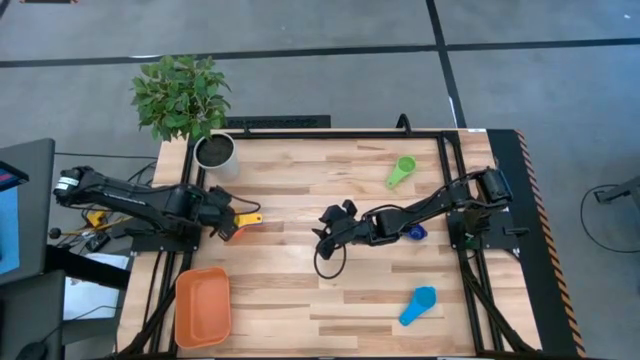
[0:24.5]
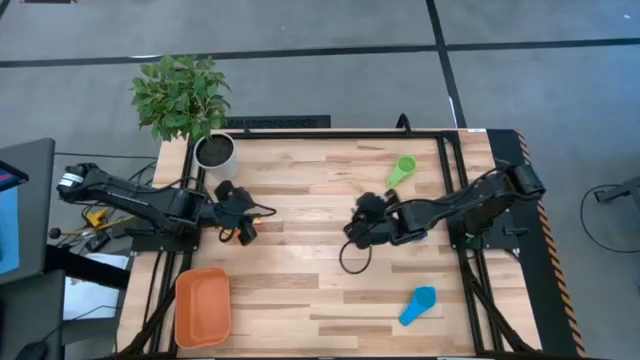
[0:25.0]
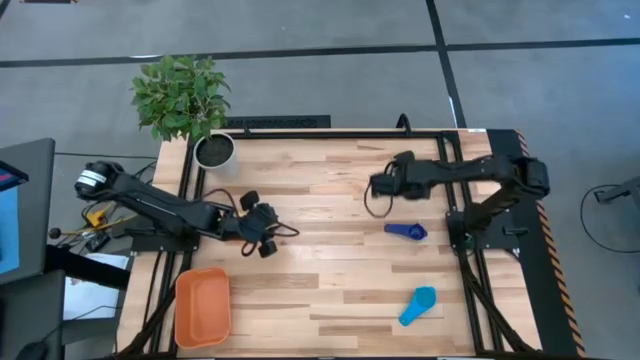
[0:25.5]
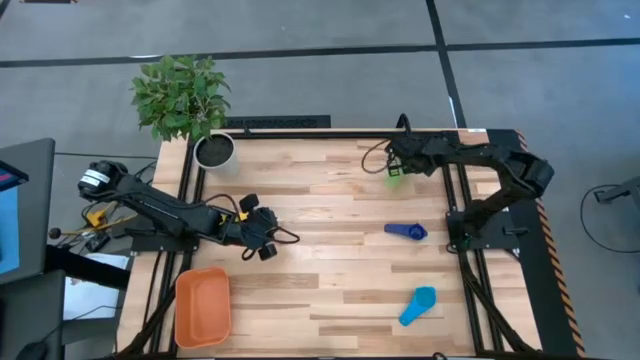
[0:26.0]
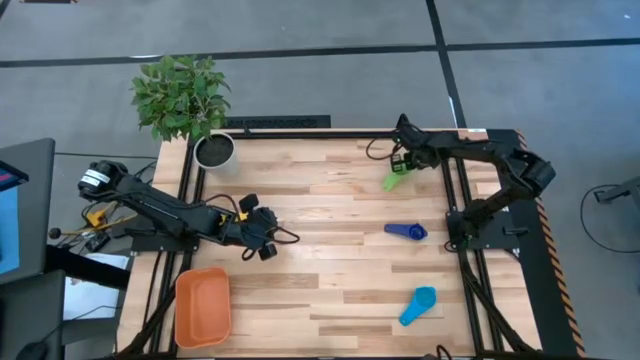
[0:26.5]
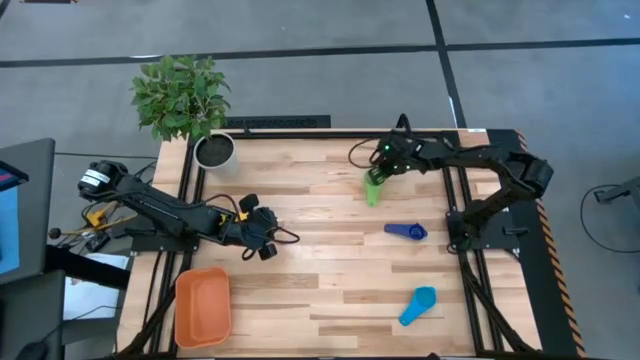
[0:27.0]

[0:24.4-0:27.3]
Task: Nest measuring cups in basket
Stack the green measuring cup on top of the yellow measuring cup

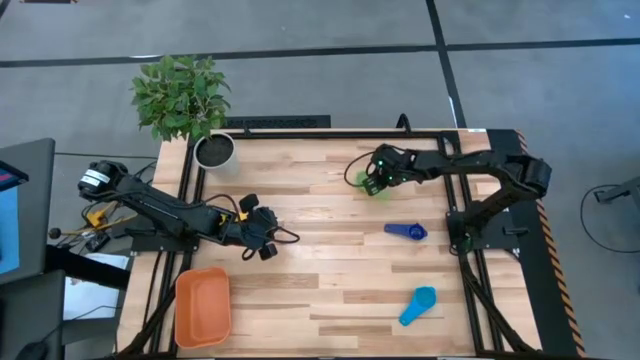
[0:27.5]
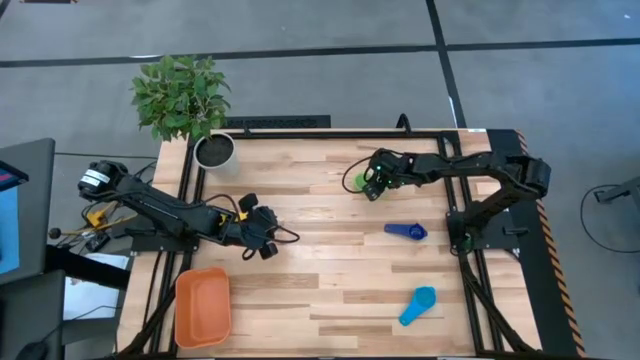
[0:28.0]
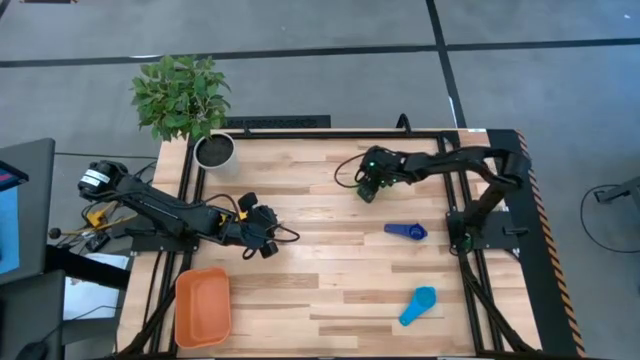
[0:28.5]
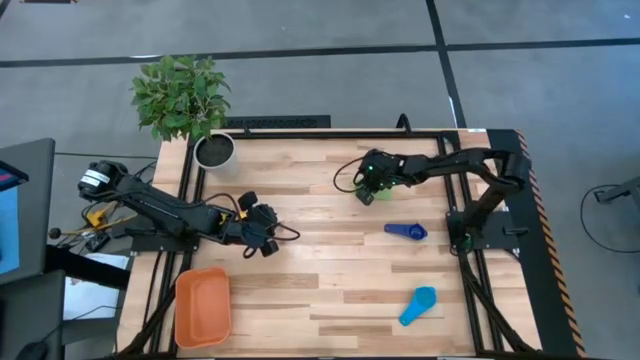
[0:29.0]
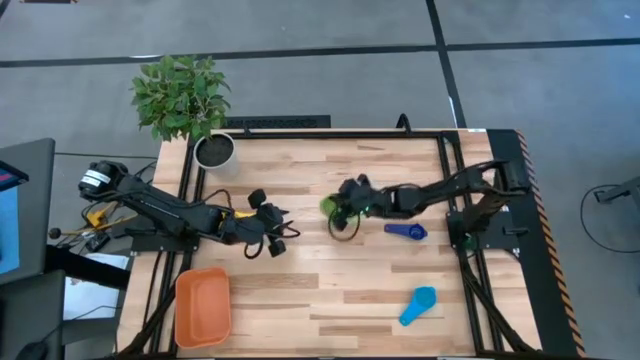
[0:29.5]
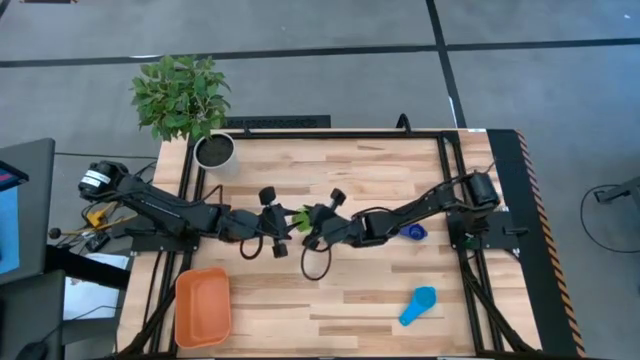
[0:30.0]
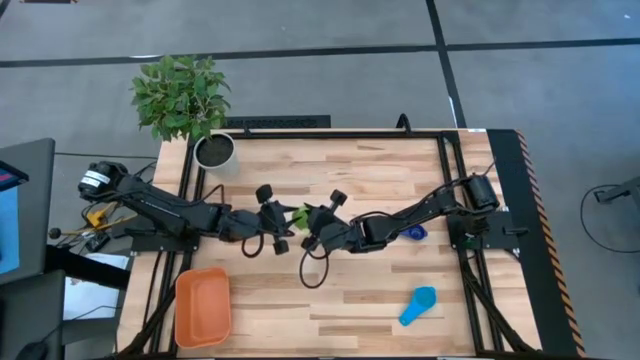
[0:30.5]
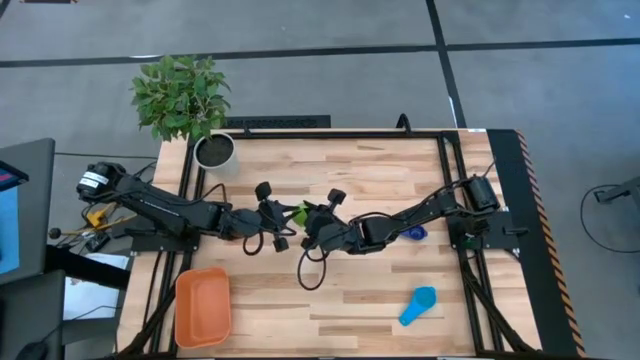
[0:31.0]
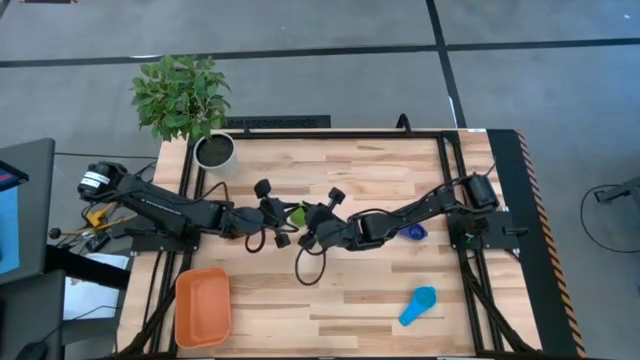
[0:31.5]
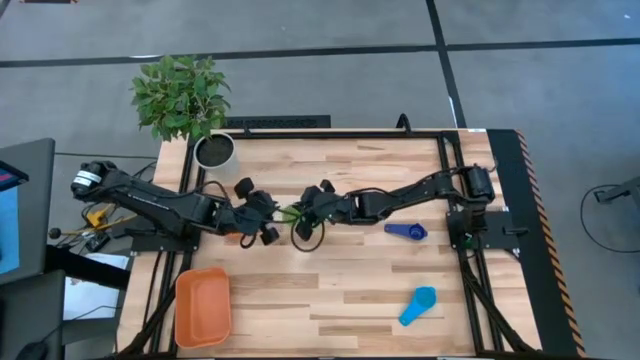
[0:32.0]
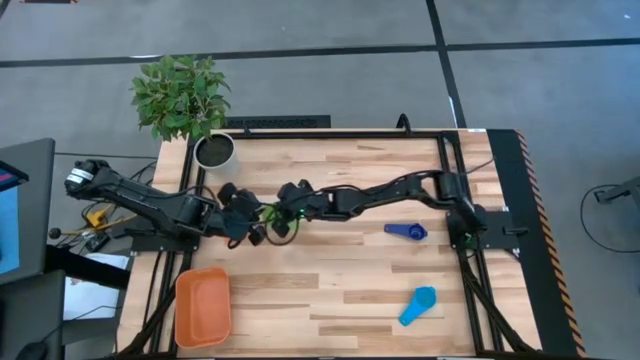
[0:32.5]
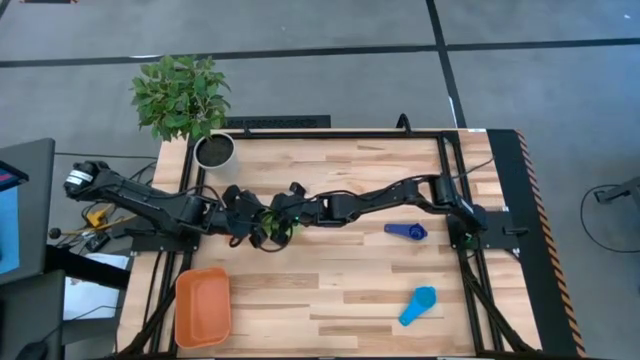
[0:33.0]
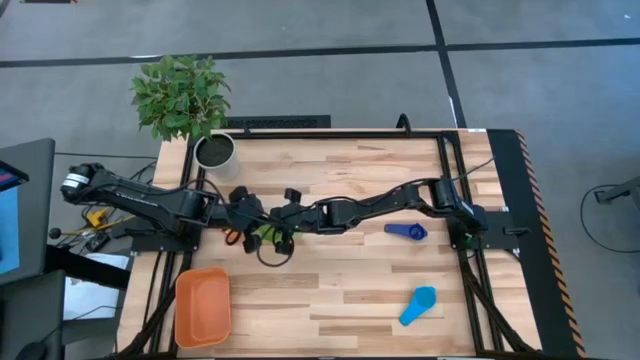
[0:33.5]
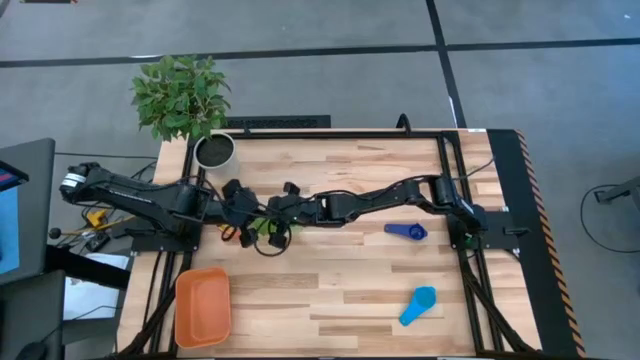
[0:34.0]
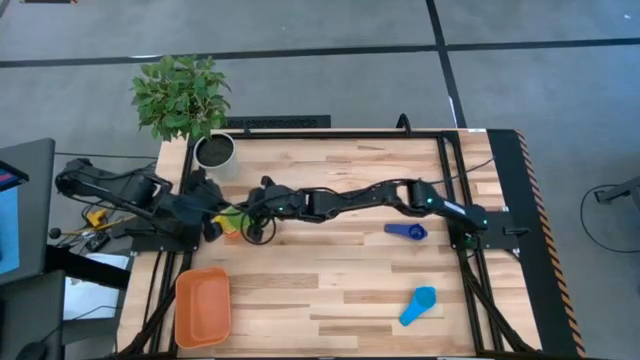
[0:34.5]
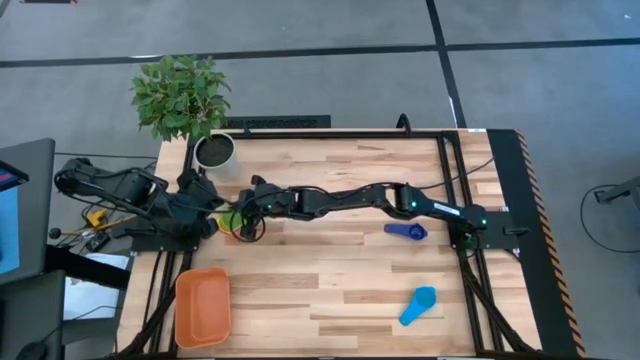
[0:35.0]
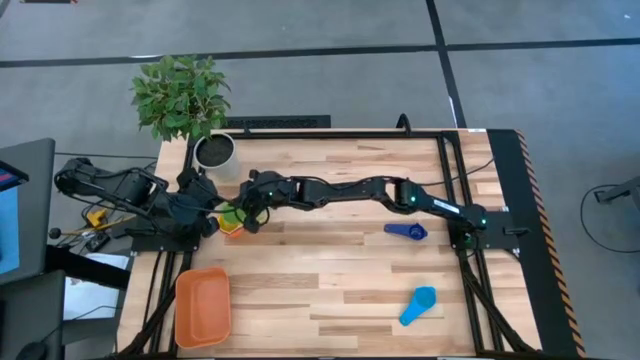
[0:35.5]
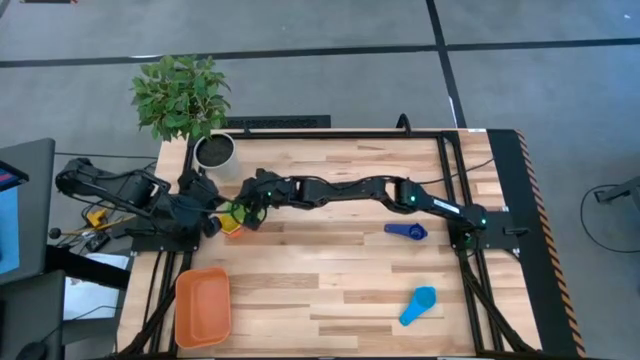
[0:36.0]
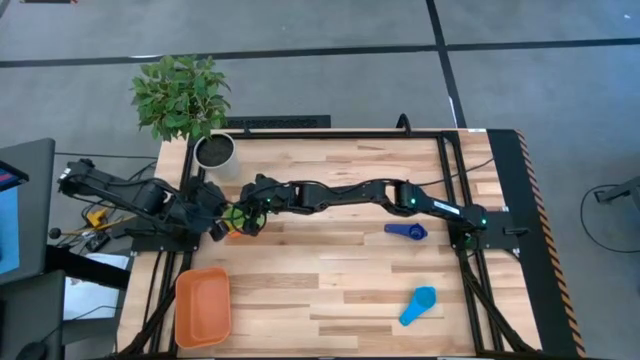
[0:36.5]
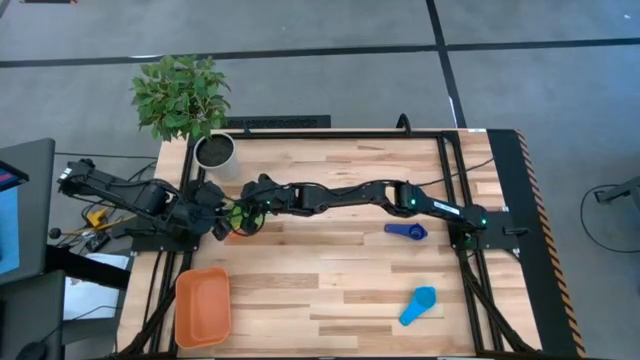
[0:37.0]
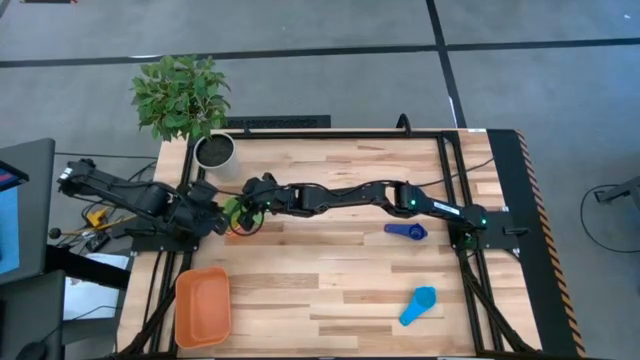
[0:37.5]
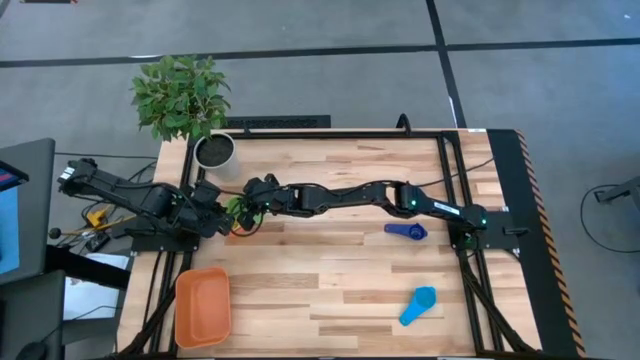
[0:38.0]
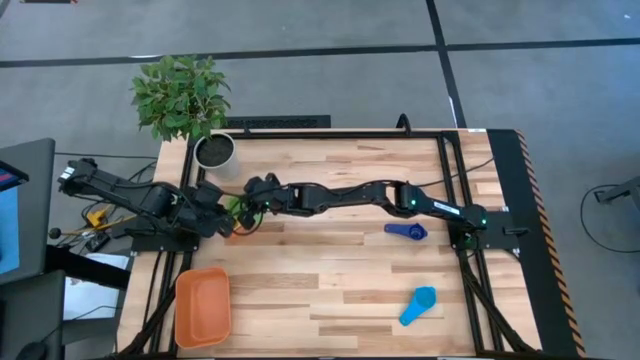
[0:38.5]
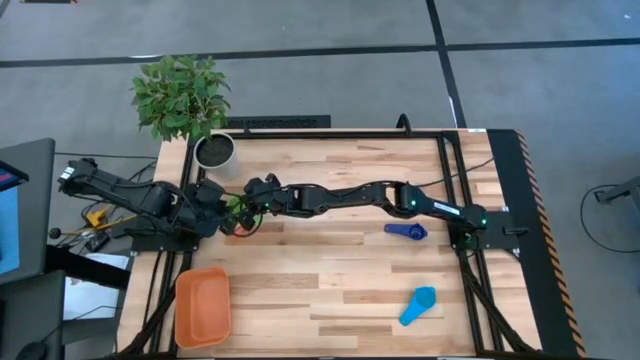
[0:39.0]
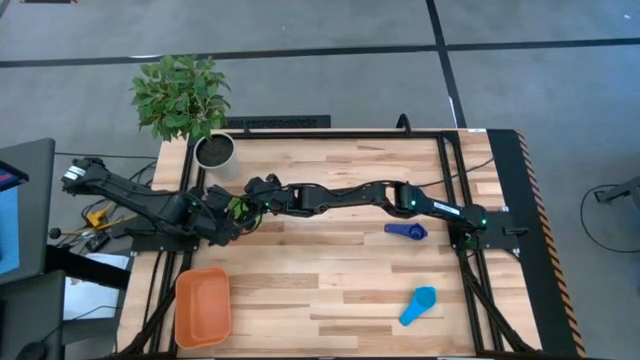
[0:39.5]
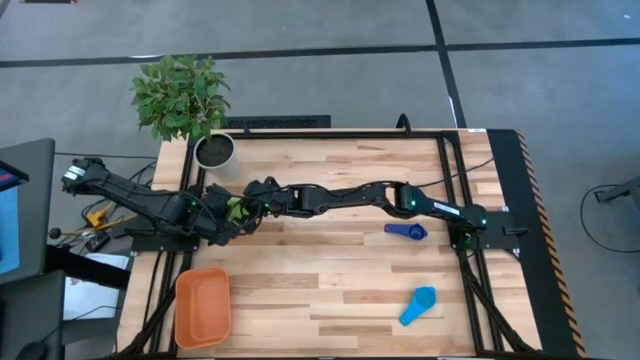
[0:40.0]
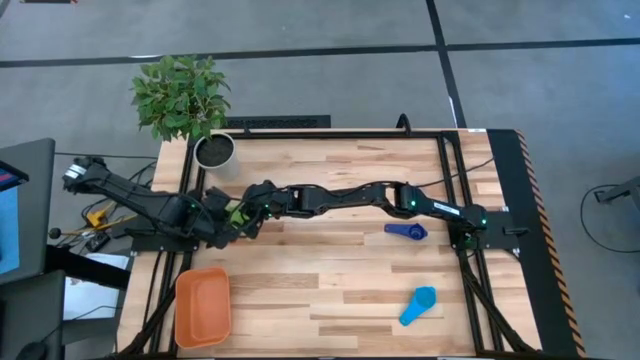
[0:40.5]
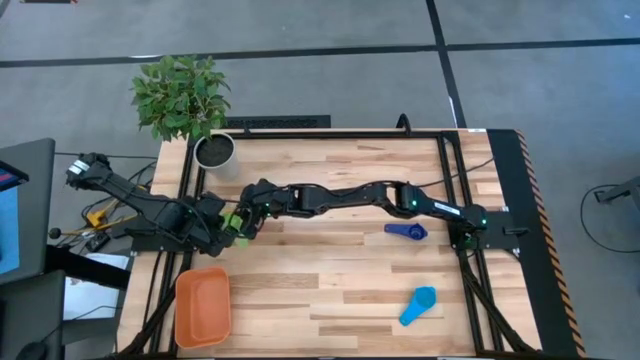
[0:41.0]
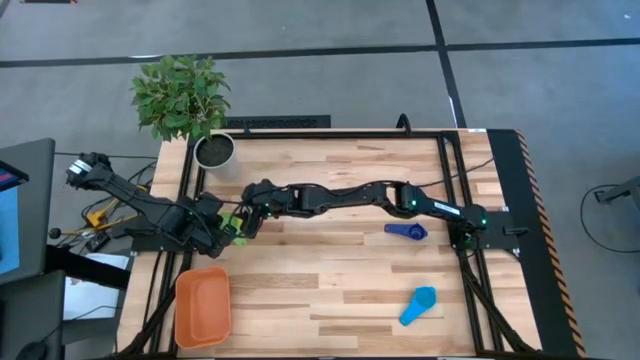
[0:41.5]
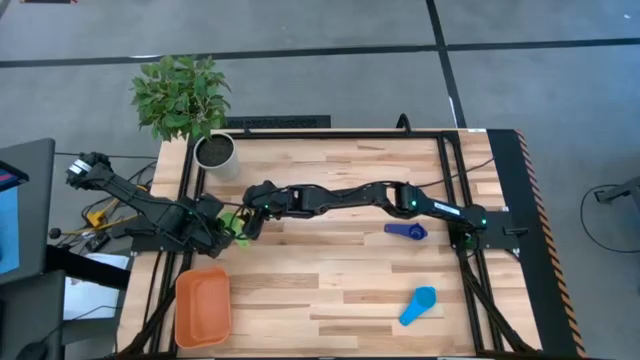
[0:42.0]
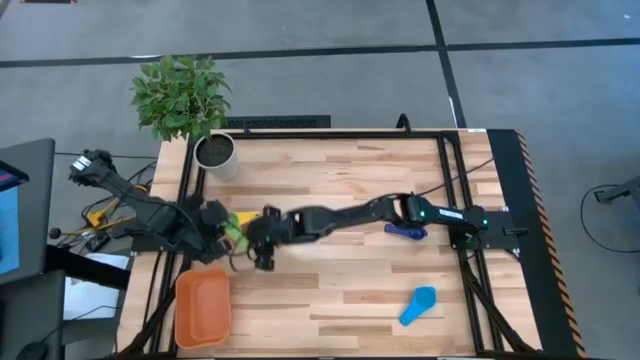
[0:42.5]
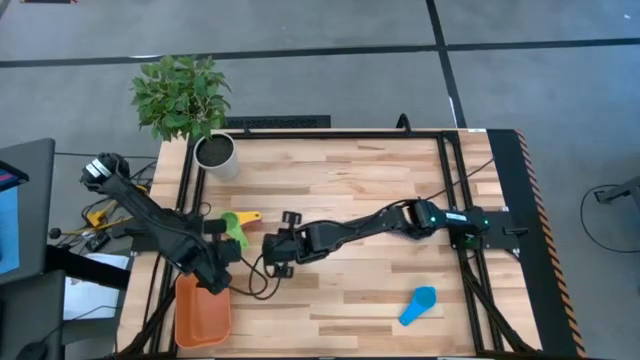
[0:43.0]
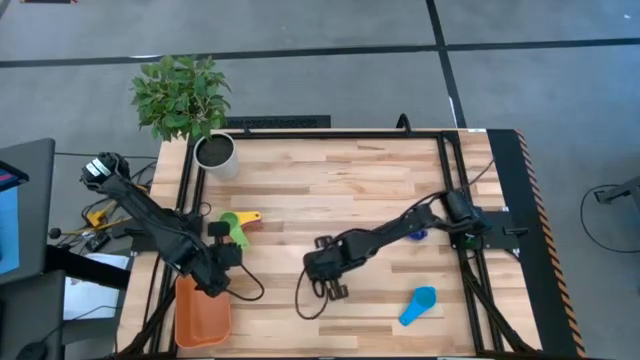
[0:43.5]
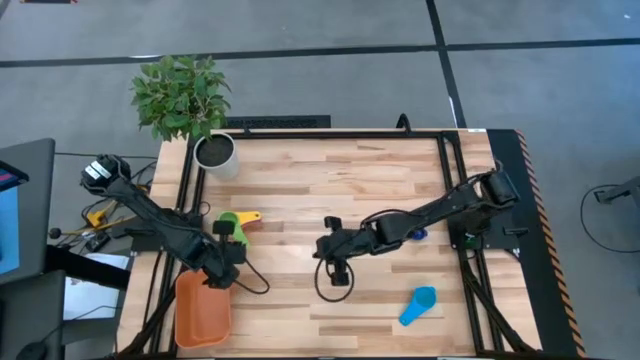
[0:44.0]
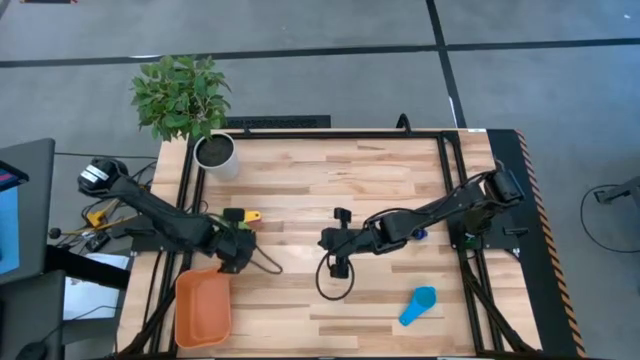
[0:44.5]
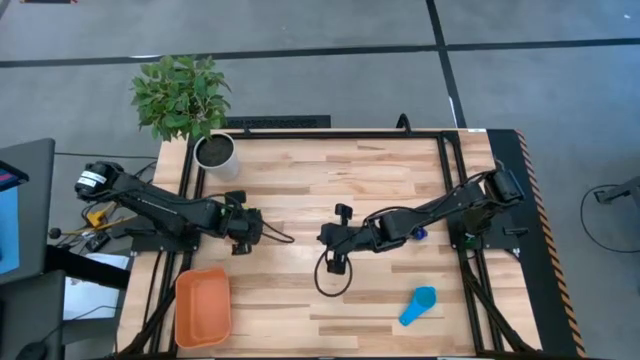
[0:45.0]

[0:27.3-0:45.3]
Stack the green measuring cup on top of the yellow measuring cup

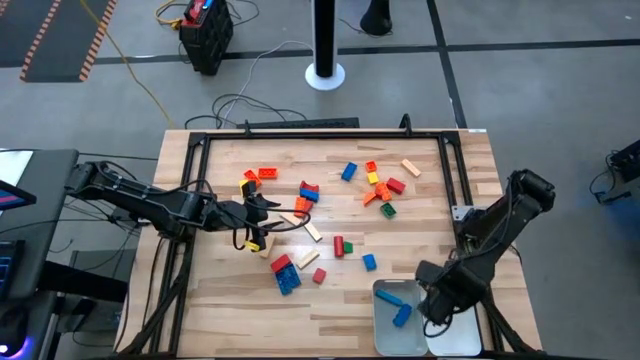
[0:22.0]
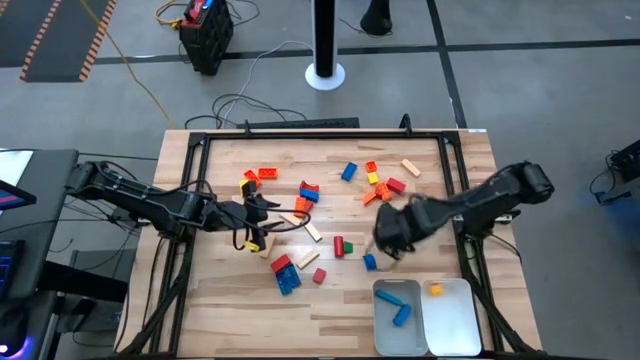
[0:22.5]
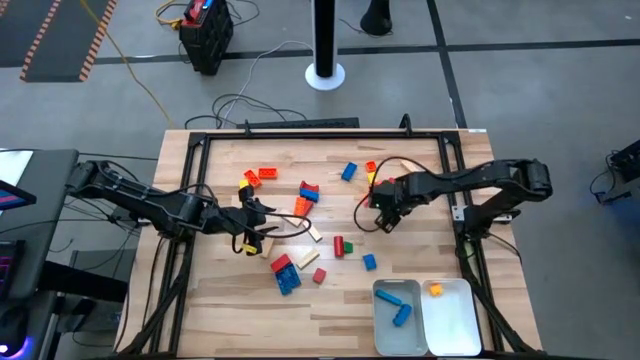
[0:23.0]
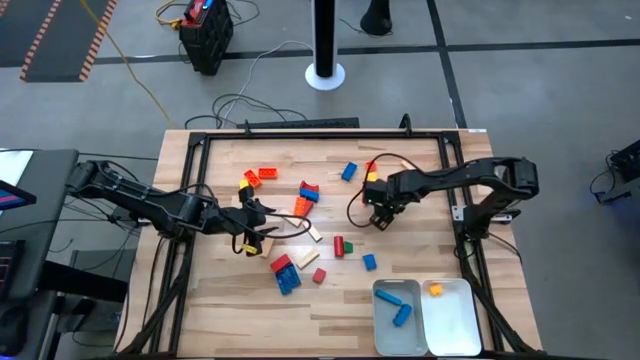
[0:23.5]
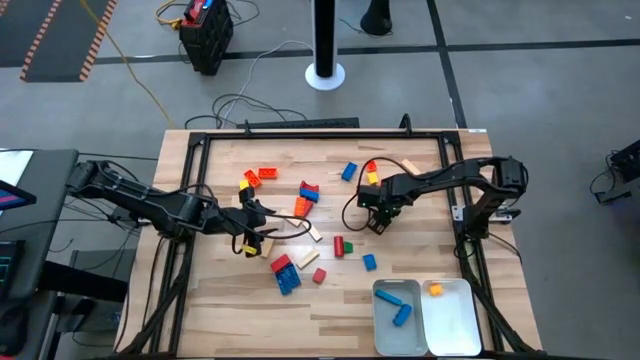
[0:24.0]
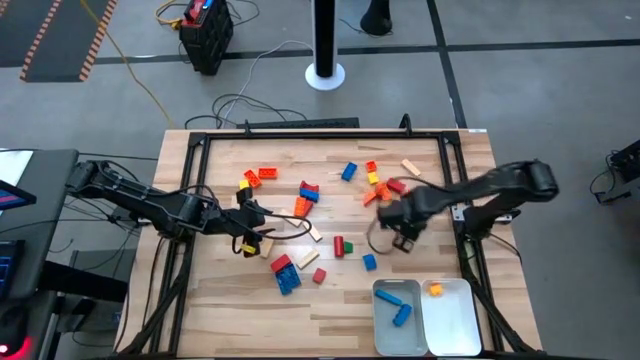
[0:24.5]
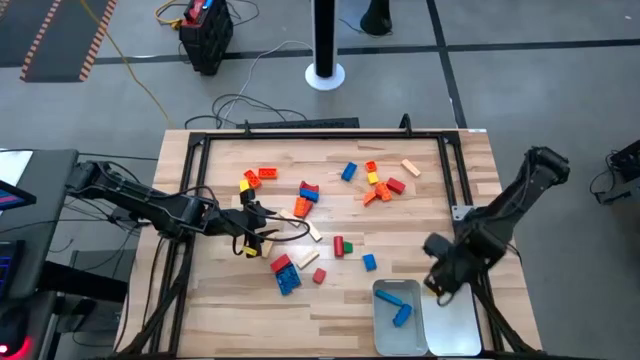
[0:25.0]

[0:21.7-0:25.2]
Task: Sort blocks by size
Put the small green game piece into the white bin
